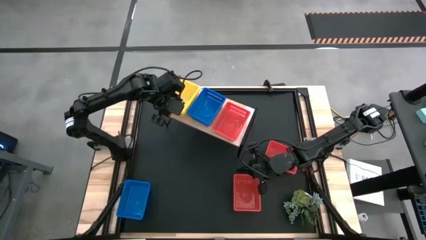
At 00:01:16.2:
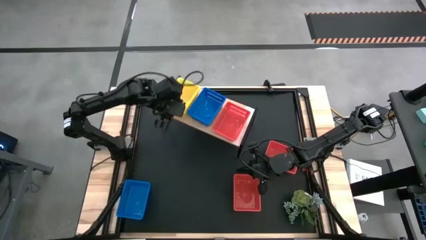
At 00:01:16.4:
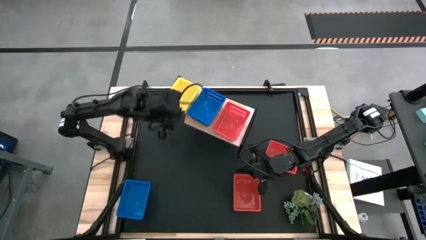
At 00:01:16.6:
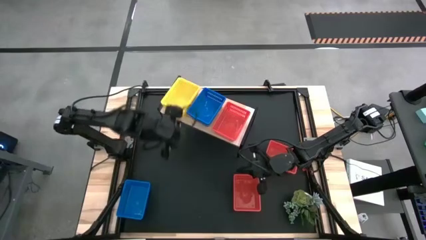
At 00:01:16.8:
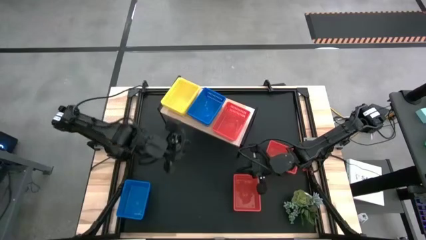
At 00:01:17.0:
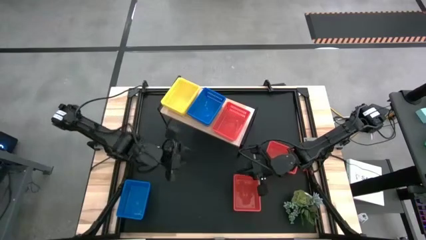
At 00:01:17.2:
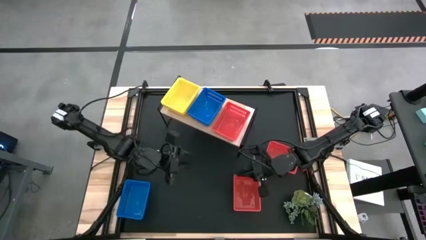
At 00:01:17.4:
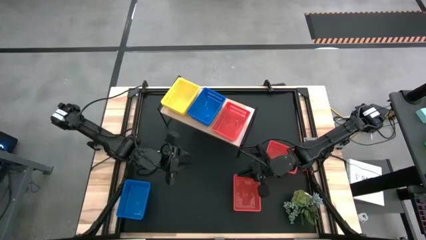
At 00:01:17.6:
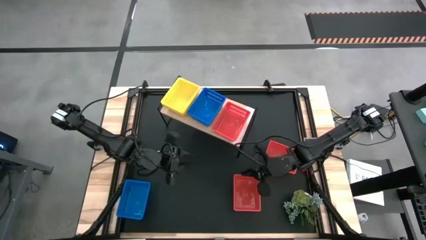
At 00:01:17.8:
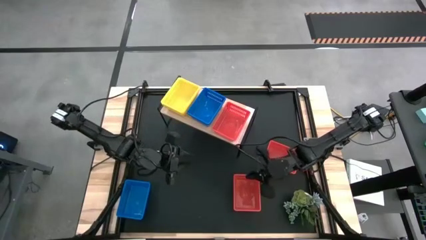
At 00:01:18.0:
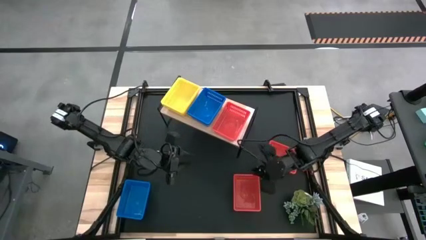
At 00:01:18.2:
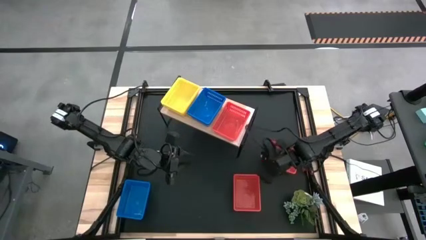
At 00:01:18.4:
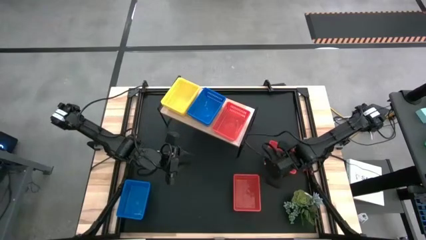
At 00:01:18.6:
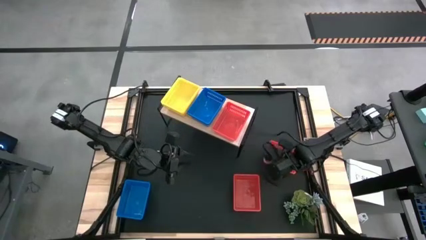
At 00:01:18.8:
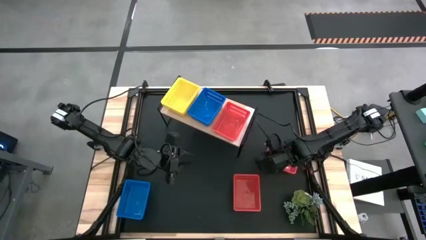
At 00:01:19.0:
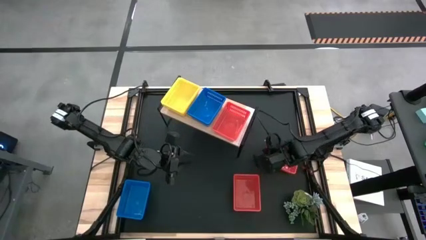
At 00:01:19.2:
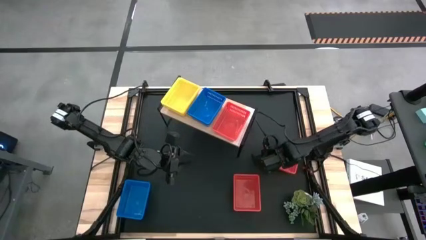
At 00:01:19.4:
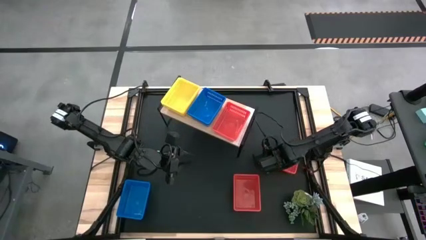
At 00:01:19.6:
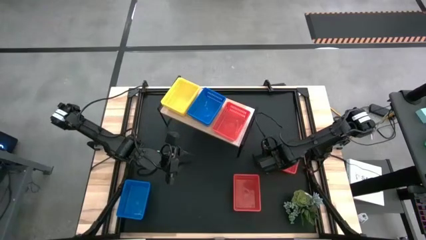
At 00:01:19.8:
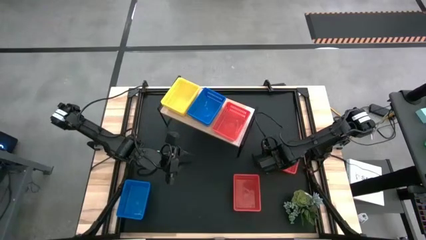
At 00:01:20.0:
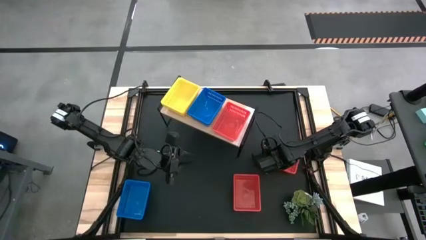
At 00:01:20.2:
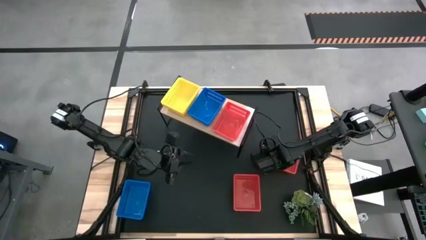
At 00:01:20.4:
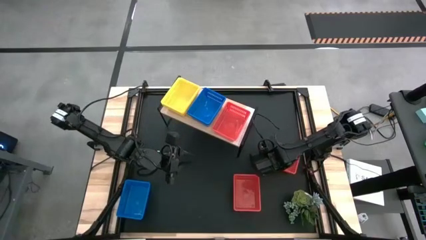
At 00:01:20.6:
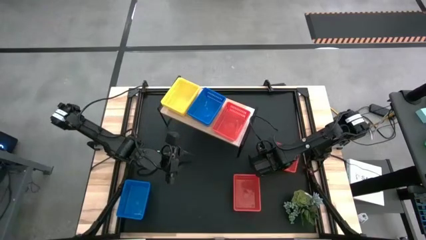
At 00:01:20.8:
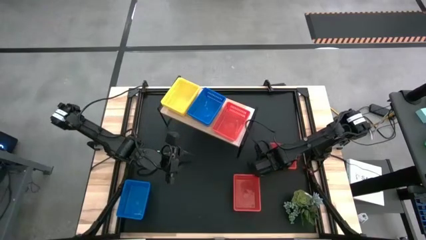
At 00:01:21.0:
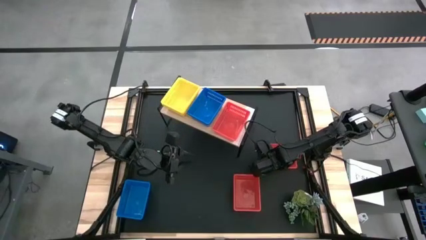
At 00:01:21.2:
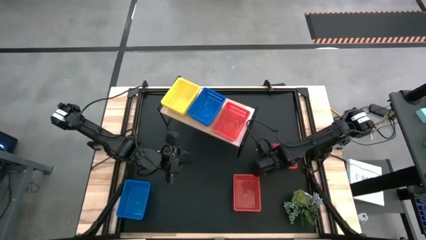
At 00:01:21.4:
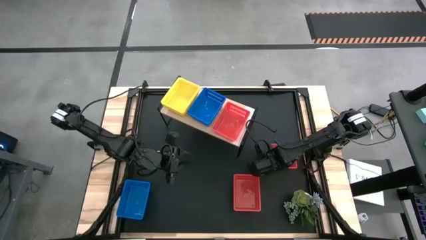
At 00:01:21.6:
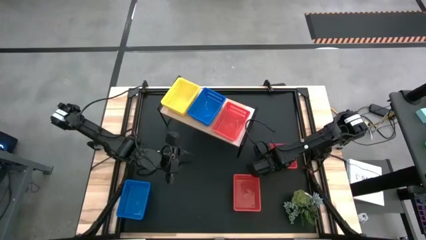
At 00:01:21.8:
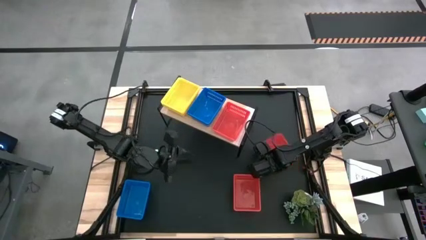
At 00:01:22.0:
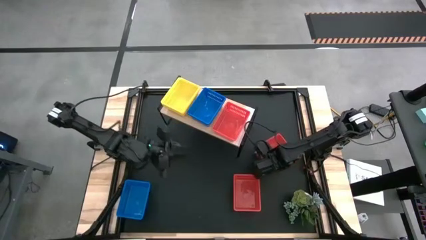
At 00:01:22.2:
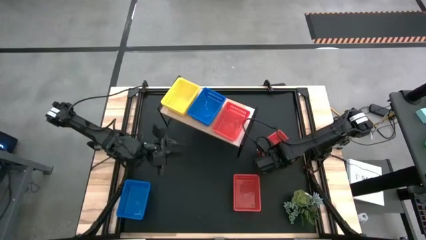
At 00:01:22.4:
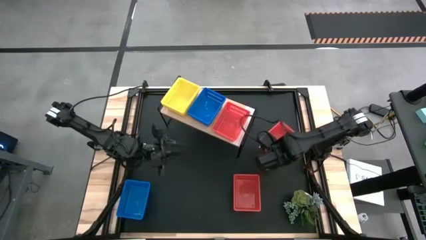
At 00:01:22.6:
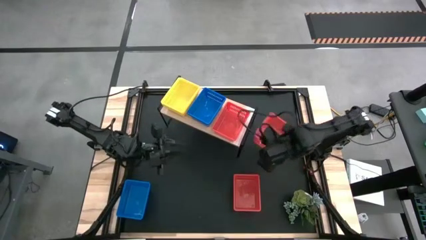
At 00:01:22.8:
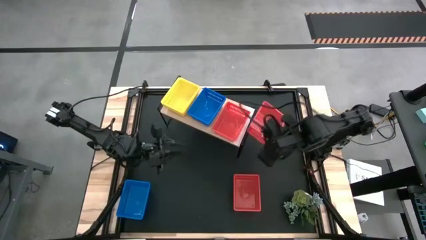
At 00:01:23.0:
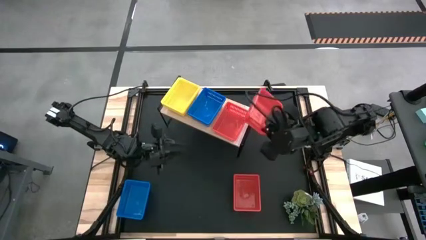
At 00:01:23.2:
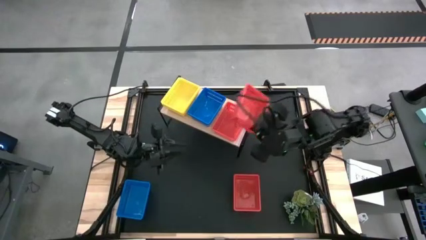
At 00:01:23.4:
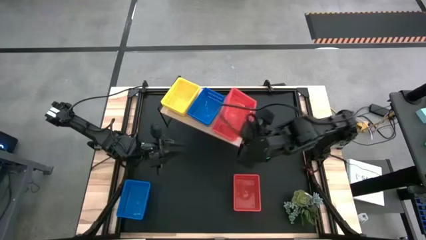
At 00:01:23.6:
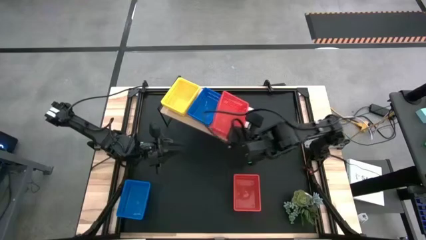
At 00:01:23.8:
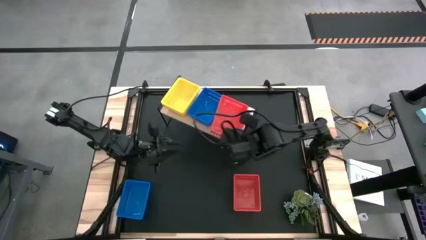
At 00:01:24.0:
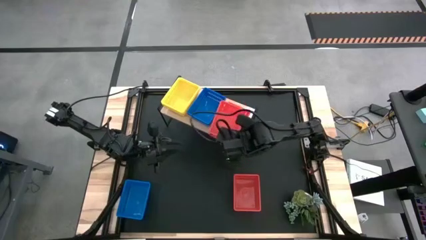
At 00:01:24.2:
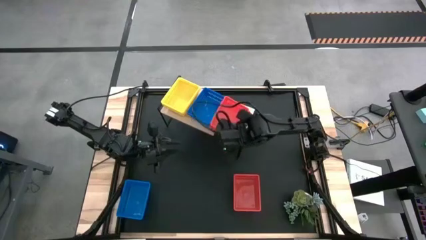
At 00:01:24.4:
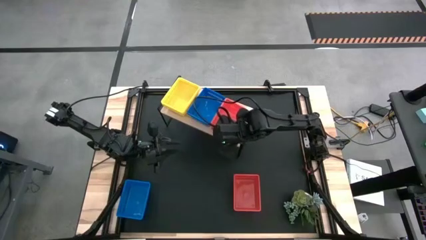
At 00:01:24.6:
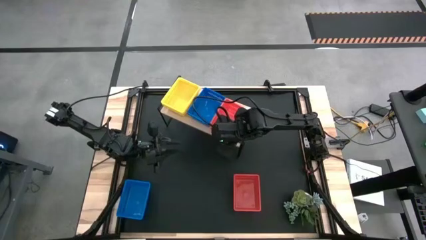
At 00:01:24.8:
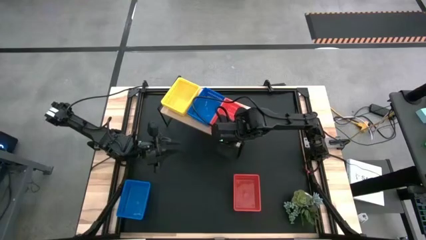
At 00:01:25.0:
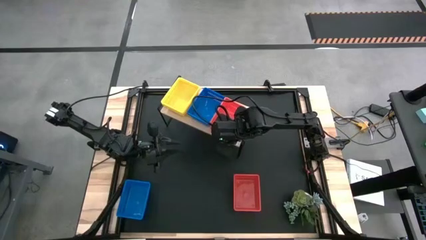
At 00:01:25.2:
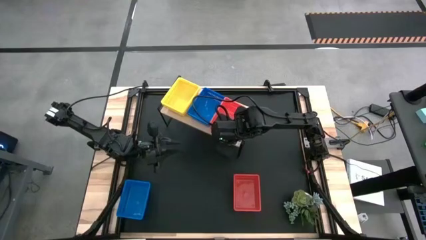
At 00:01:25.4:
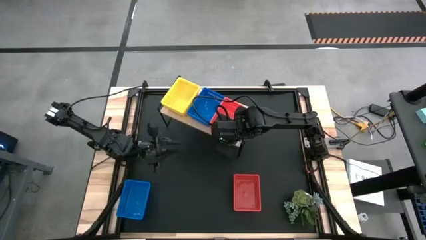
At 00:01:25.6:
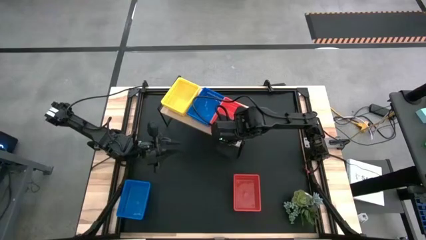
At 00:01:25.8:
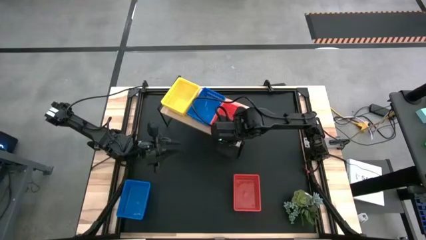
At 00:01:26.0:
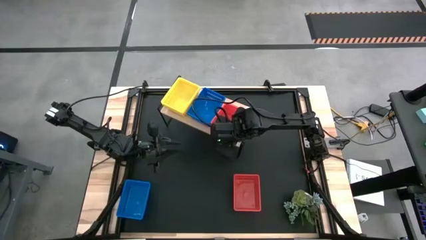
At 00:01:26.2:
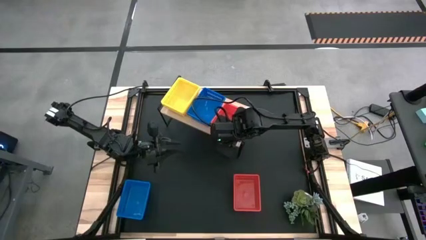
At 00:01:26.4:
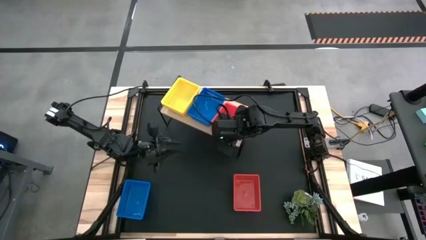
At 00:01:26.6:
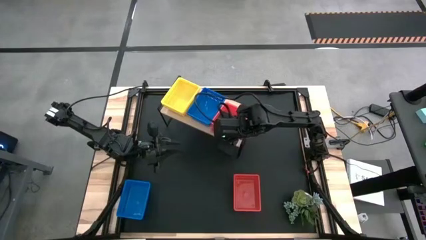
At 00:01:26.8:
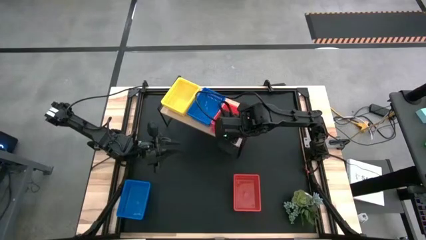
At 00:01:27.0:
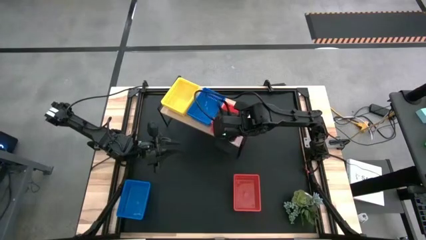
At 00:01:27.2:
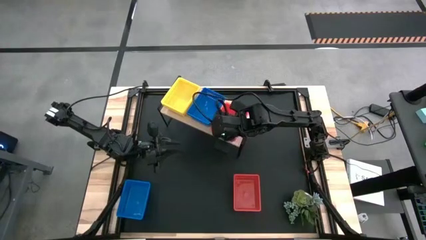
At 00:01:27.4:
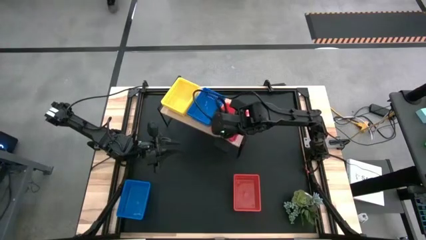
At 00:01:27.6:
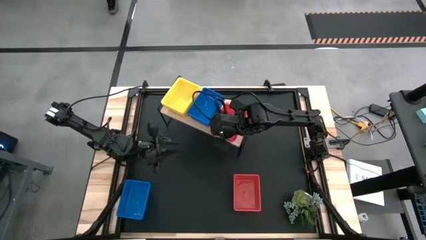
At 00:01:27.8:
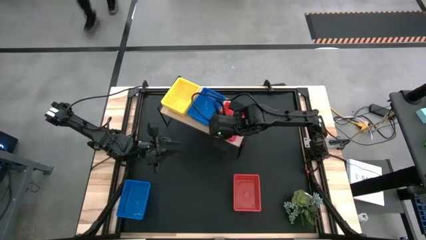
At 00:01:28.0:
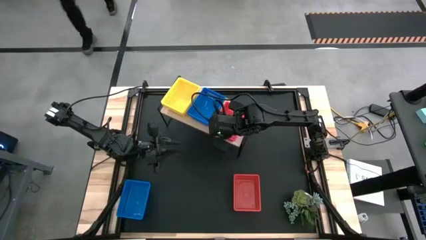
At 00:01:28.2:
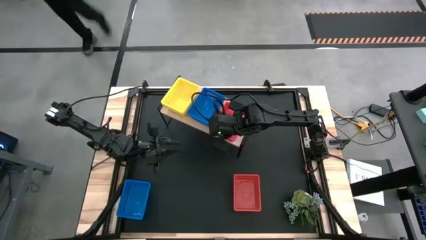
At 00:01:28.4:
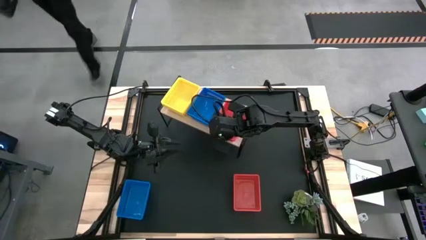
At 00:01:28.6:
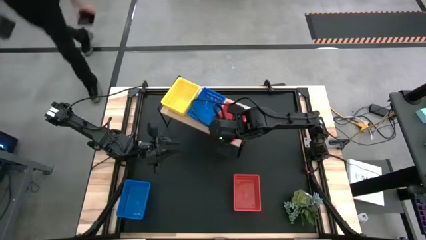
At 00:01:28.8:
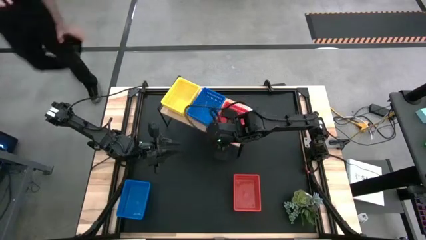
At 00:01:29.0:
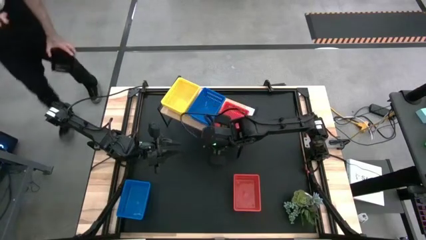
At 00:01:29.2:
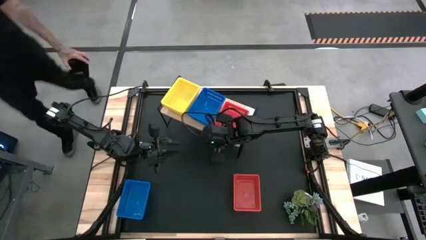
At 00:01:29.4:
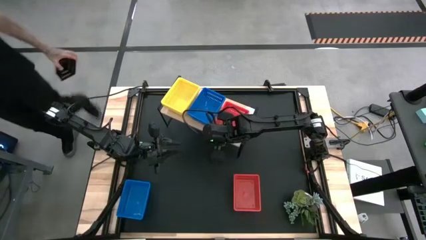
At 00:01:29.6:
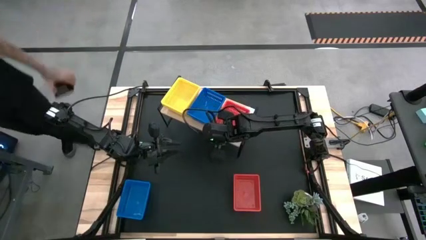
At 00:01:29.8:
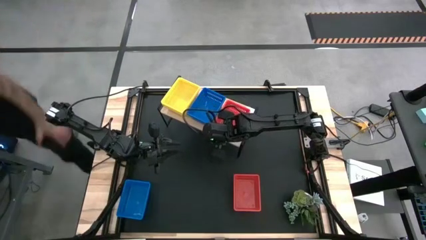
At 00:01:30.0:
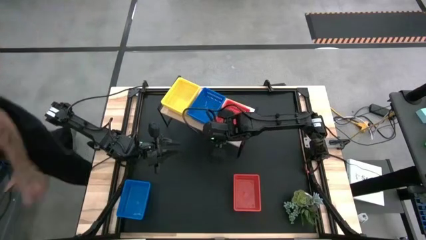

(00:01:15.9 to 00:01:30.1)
Task: Stack baskets on shelf by color
Stack the top right red bin on top of the red bin on the shelf
